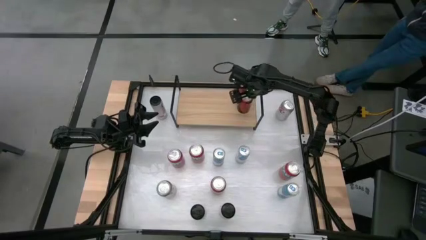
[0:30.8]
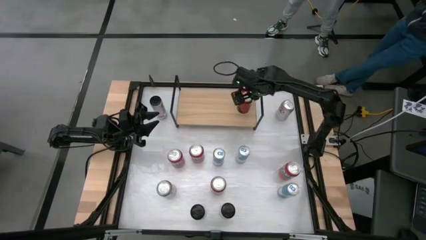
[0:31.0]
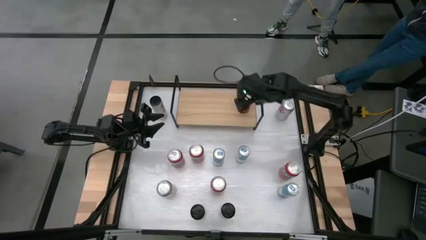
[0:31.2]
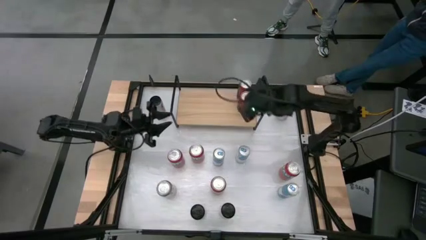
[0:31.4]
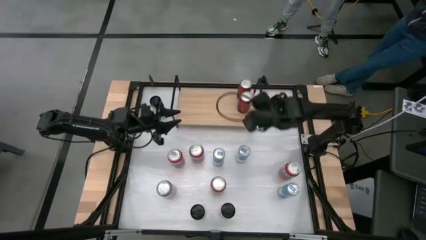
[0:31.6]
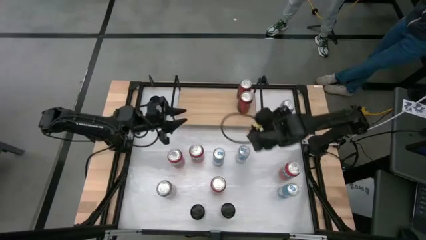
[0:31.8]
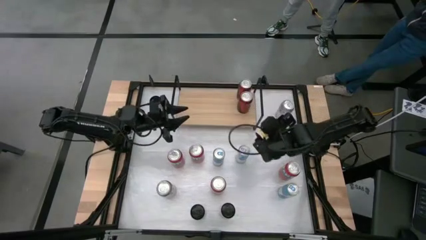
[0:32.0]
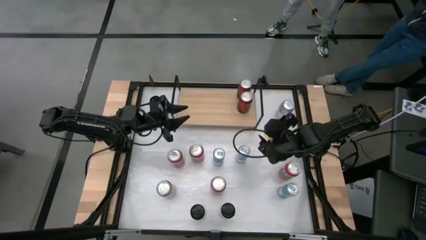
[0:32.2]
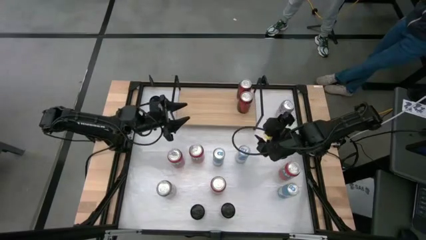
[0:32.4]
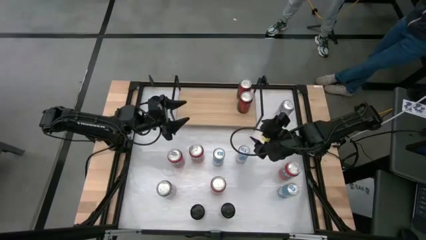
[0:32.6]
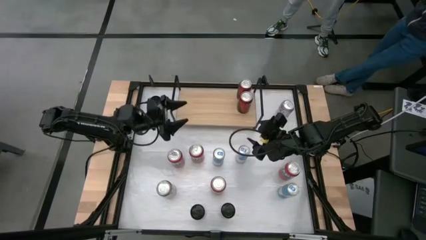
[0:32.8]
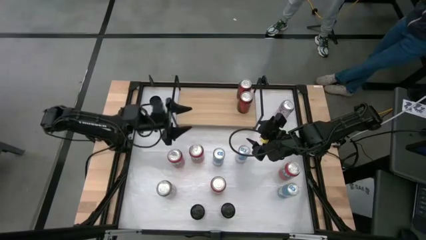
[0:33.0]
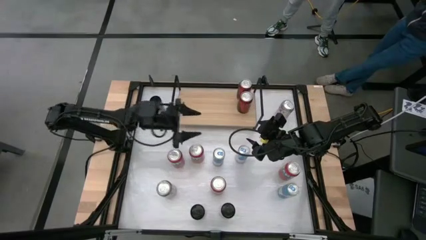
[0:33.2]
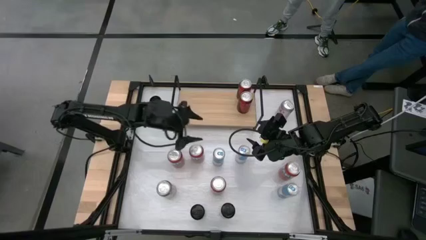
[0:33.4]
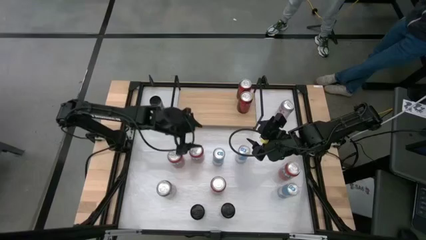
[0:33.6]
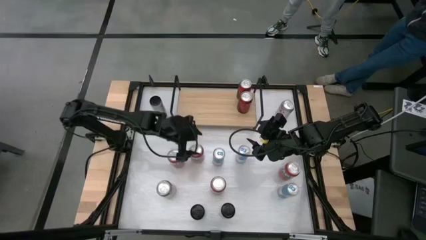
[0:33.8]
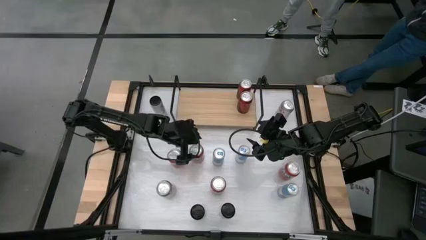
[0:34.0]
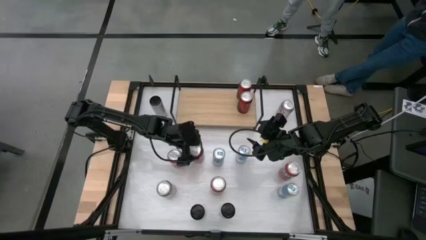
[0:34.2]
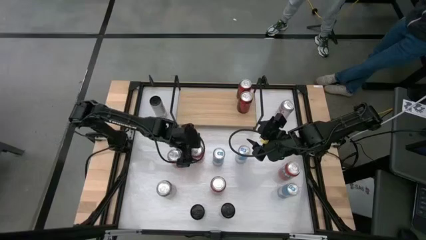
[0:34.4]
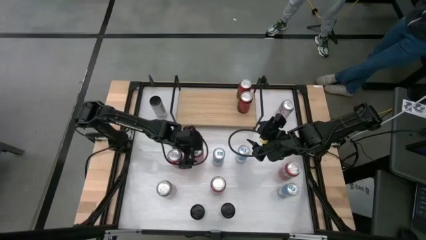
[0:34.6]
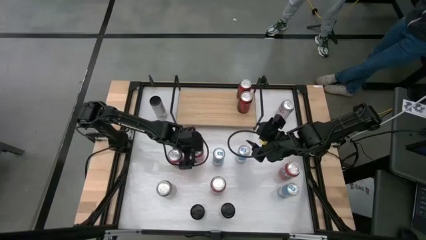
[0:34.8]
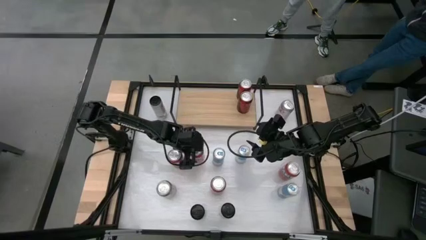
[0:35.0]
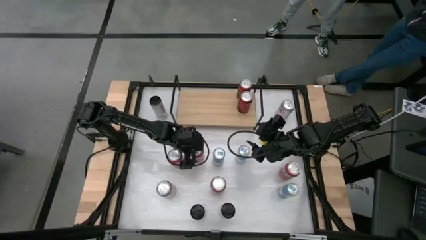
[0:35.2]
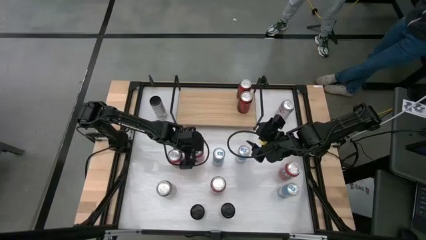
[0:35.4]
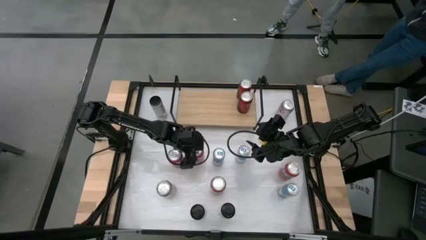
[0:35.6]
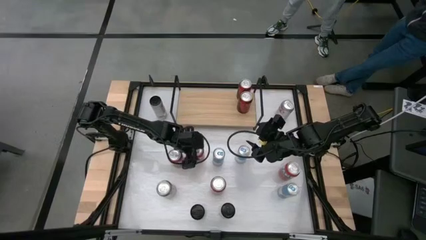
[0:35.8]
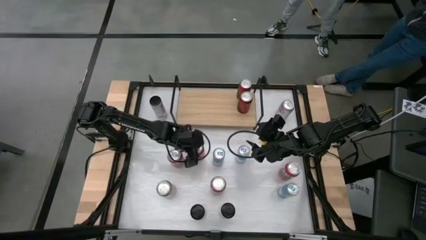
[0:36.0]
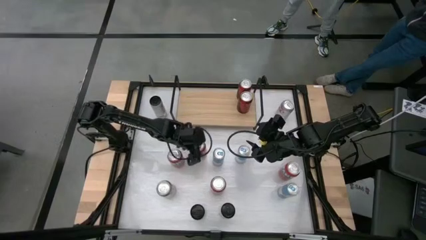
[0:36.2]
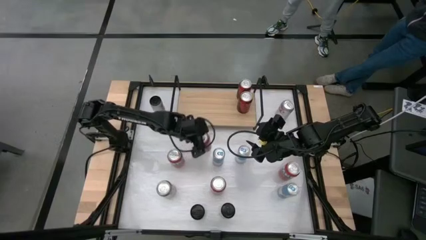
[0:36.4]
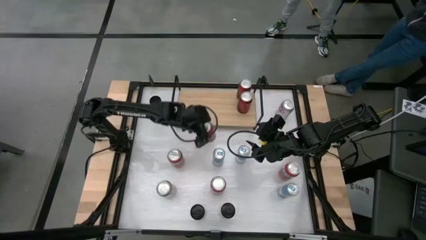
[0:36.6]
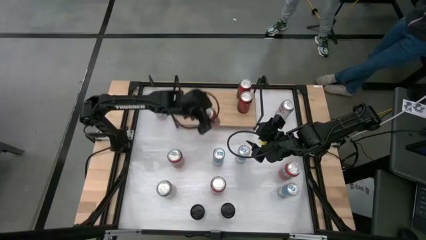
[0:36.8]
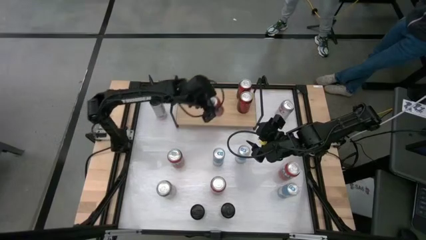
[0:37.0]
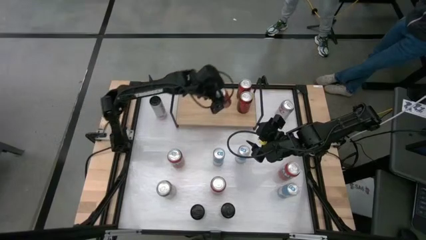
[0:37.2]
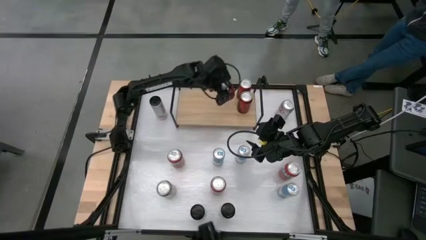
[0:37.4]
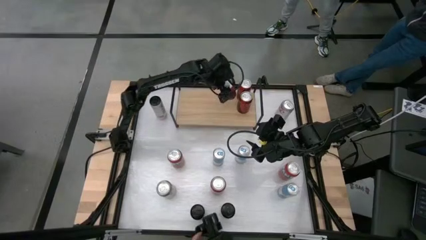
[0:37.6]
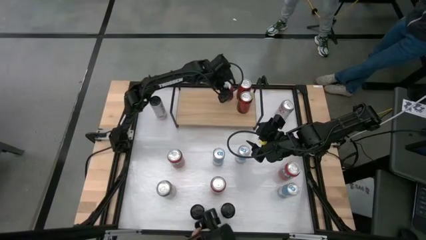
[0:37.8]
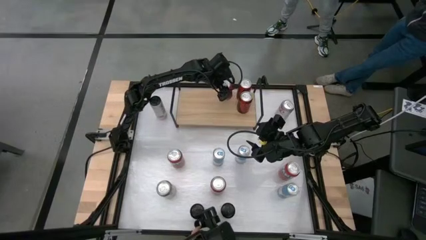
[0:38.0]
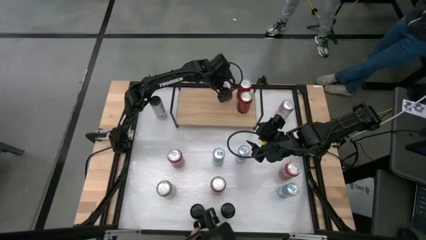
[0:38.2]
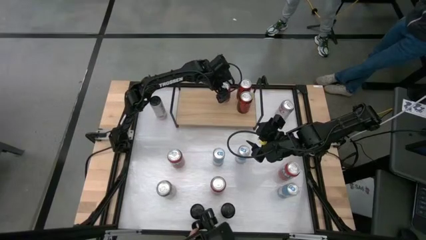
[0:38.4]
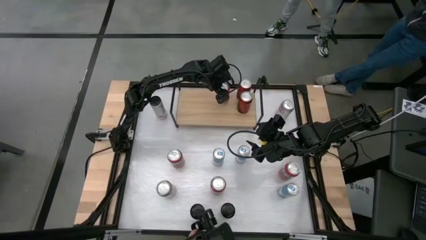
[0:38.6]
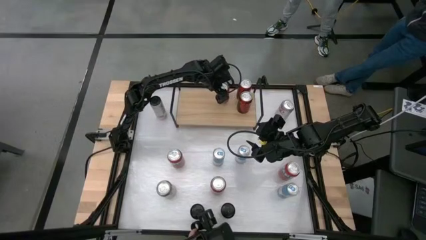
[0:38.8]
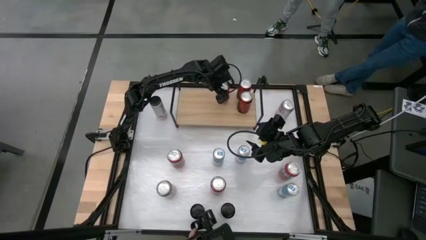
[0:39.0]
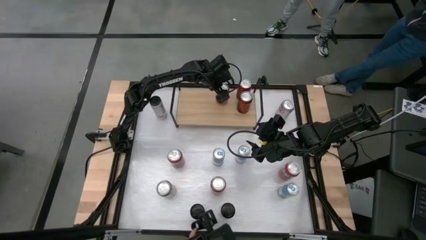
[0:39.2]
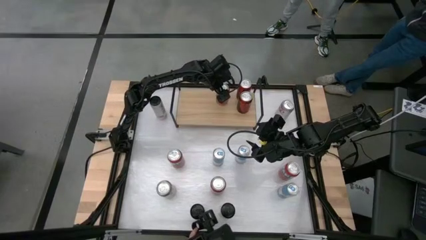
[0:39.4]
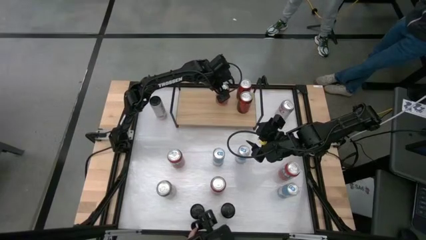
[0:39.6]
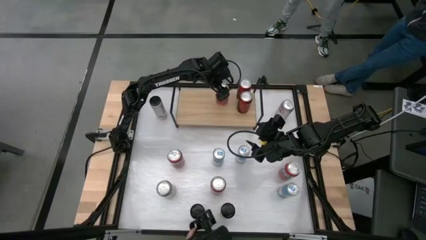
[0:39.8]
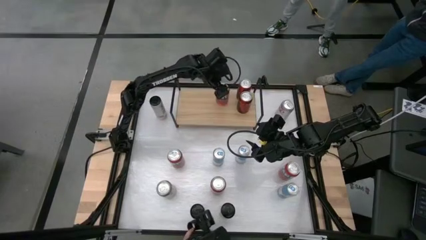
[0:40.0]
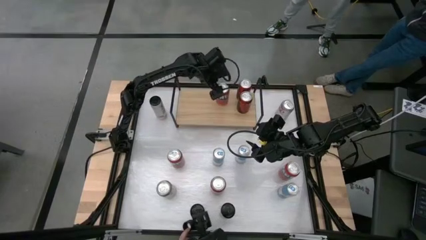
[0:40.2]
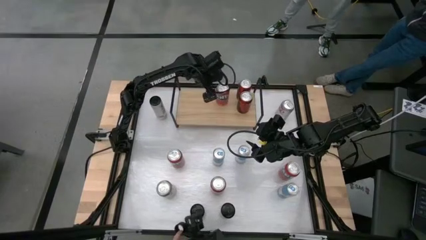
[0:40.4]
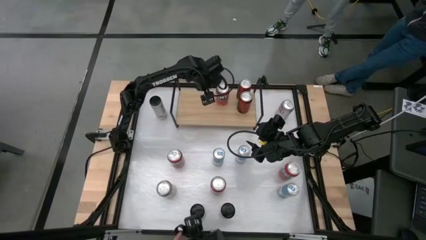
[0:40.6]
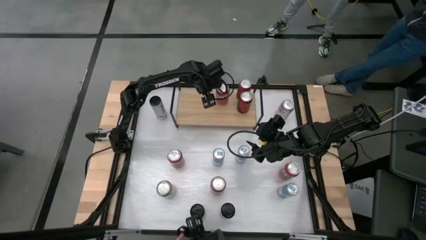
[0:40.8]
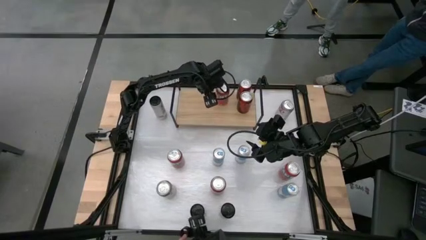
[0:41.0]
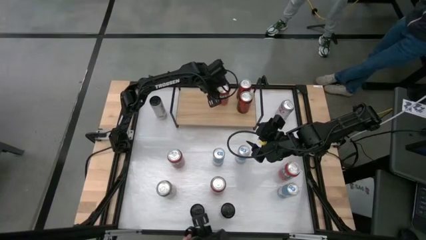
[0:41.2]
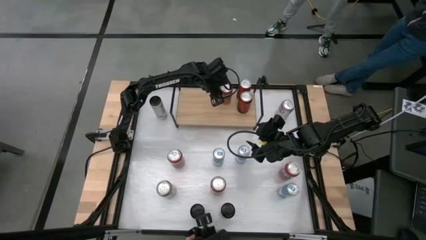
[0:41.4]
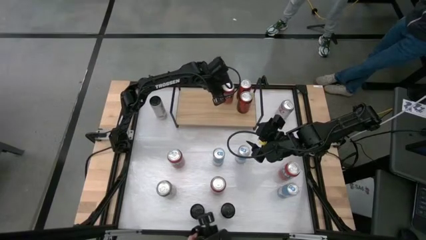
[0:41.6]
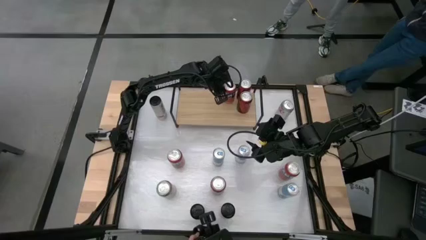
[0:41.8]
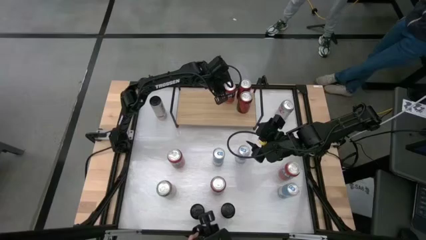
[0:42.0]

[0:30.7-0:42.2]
Task: Place canned beverage on shelf
Put the middle and pink soda can on the shelf
